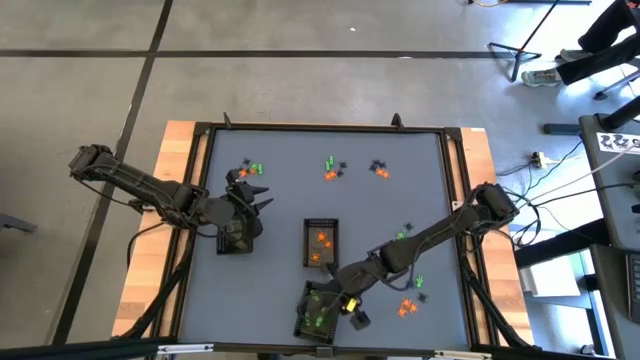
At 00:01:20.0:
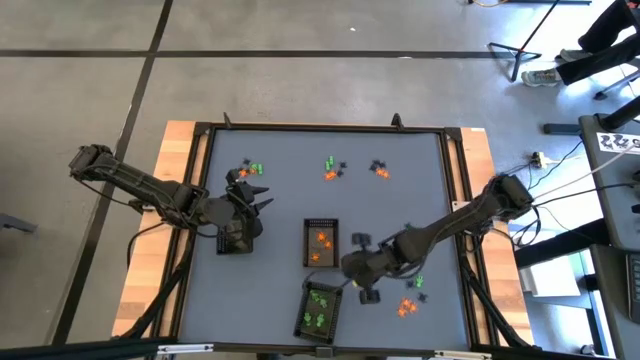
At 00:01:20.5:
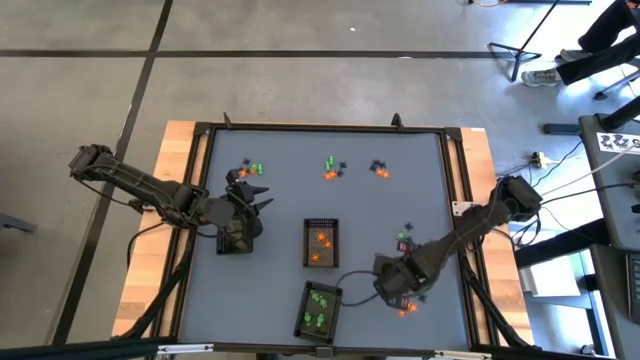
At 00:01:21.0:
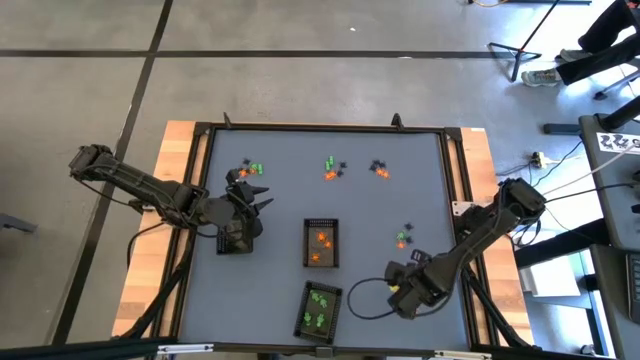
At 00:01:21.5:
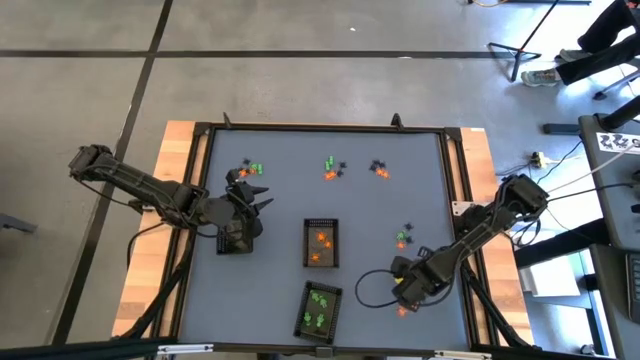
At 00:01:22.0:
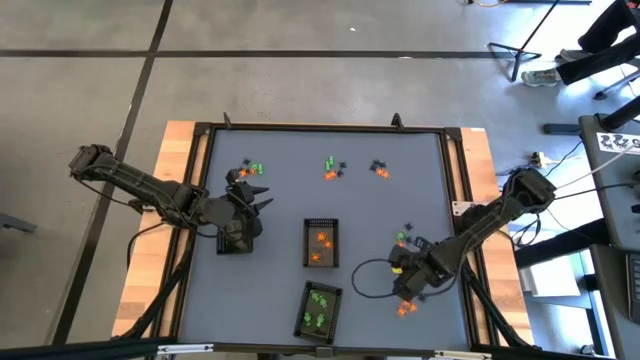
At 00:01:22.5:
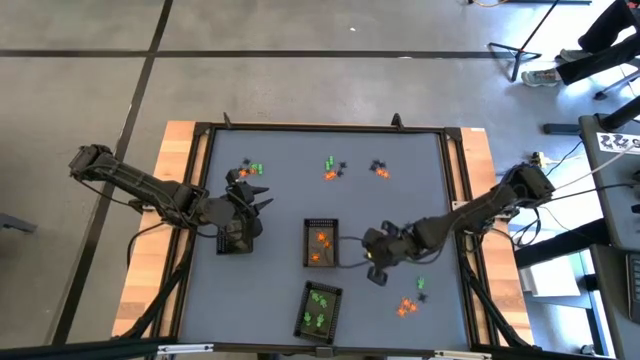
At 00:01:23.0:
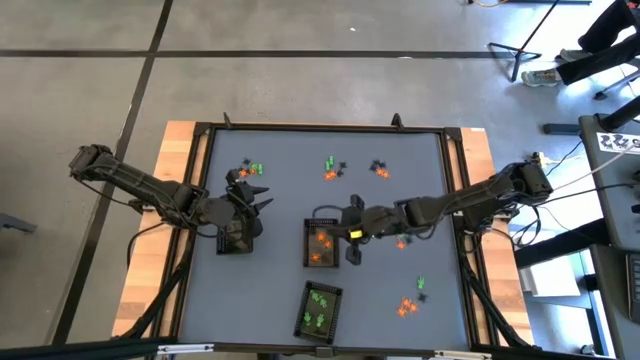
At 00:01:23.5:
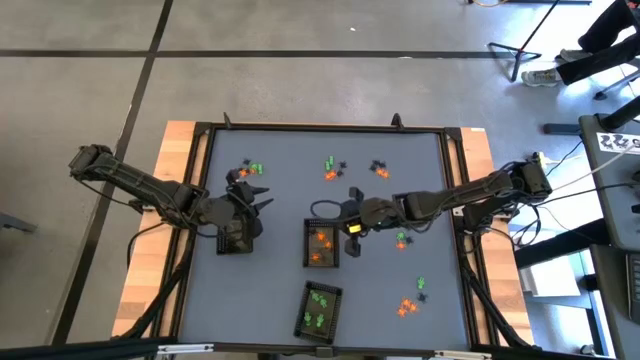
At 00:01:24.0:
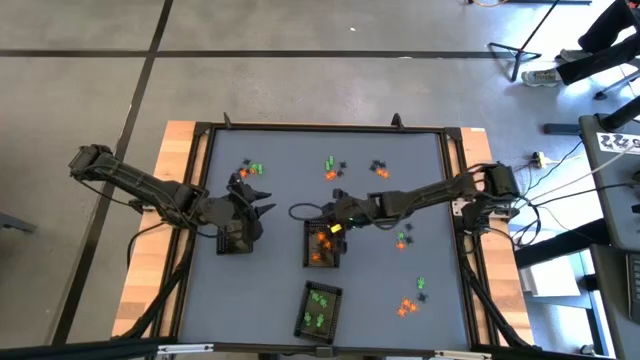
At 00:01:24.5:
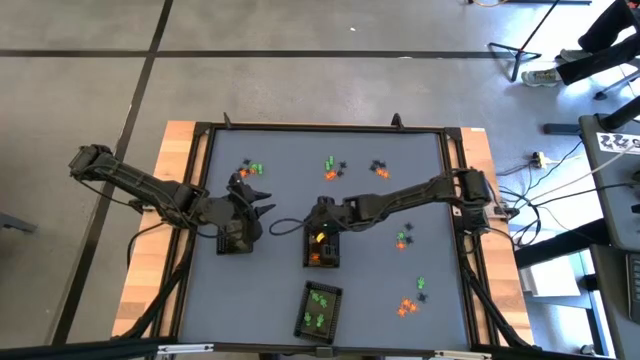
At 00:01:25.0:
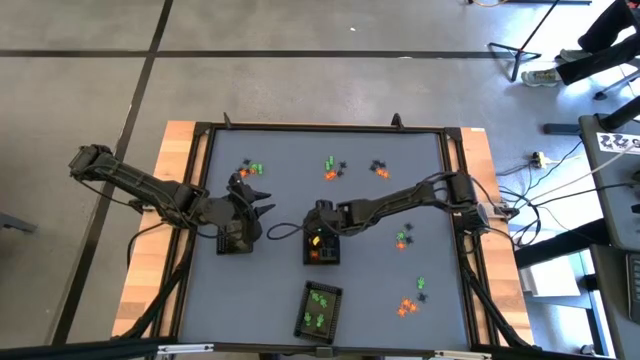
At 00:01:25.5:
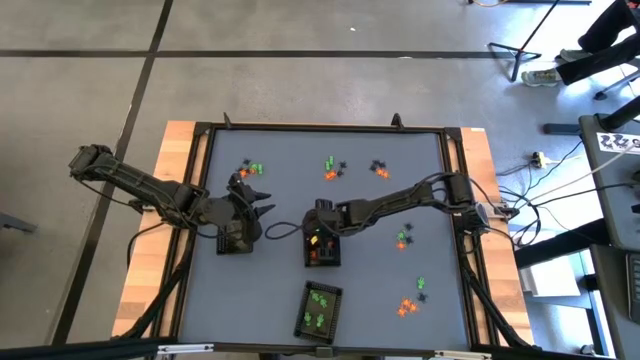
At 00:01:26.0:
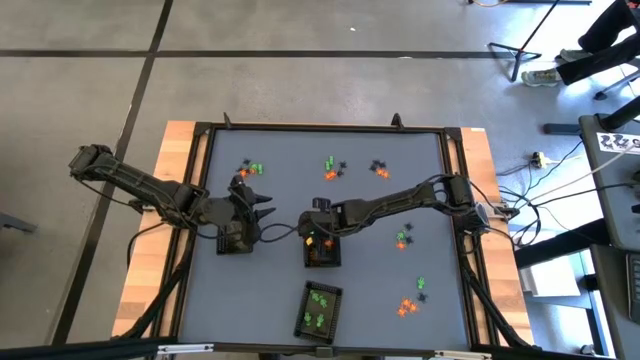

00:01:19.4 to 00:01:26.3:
Task: Sort Halloween decoration
Put the black spider toy into the top left black basket

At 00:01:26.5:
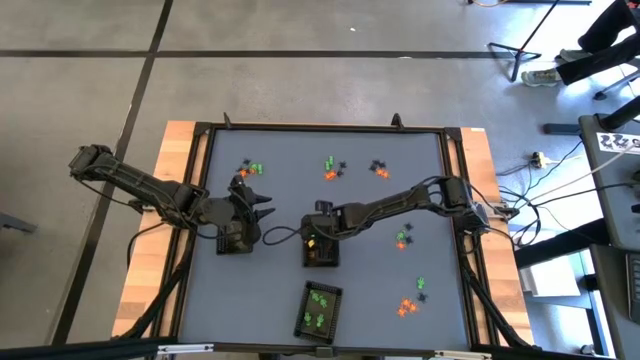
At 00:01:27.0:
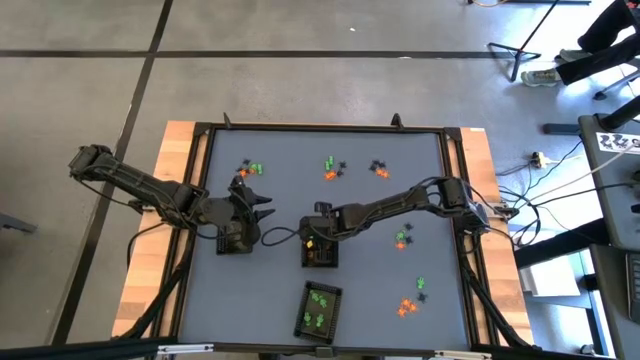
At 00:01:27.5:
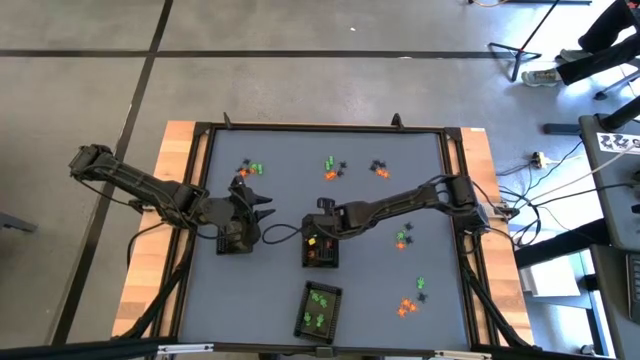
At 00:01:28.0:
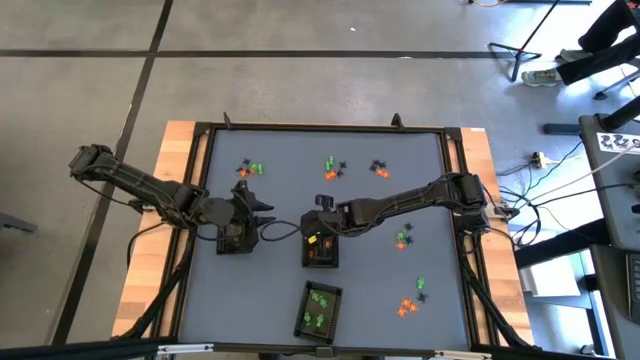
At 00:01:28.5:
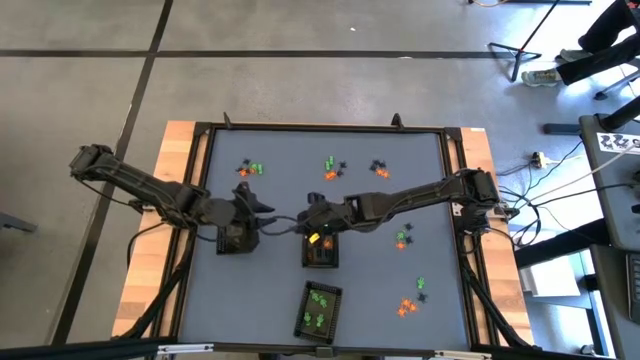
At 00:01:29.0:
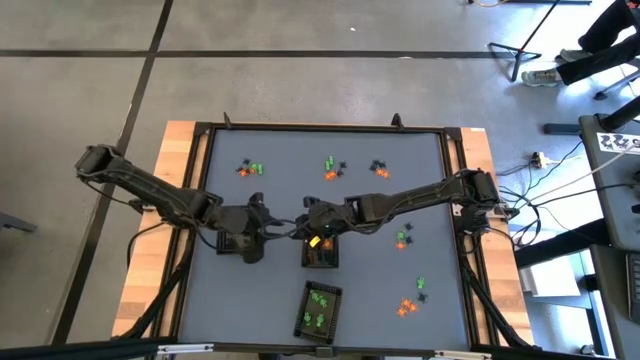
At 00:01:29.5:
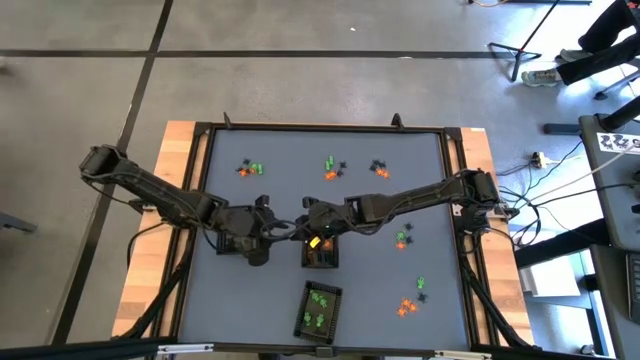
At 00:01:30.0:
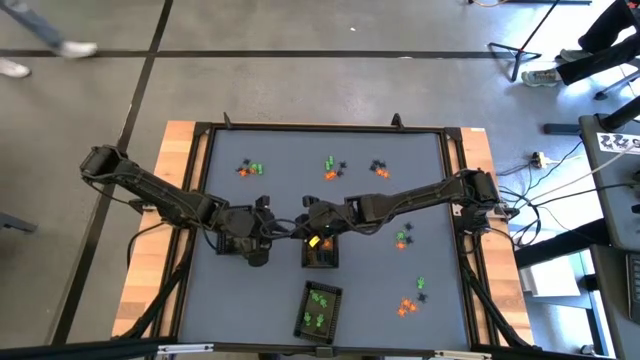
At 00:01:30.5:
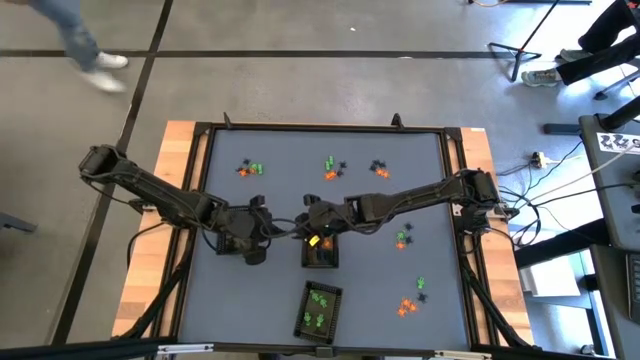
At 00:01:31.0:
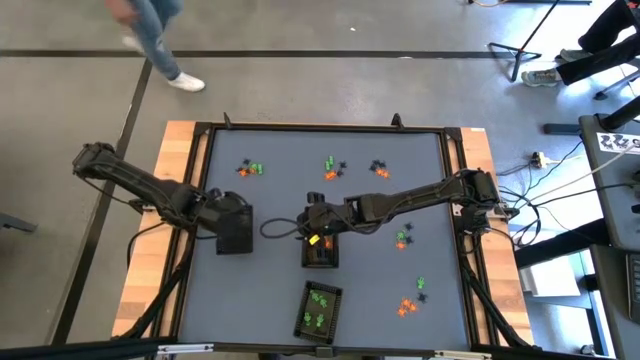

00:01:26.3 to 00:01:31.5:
Put the black spider toy into the top left black basket

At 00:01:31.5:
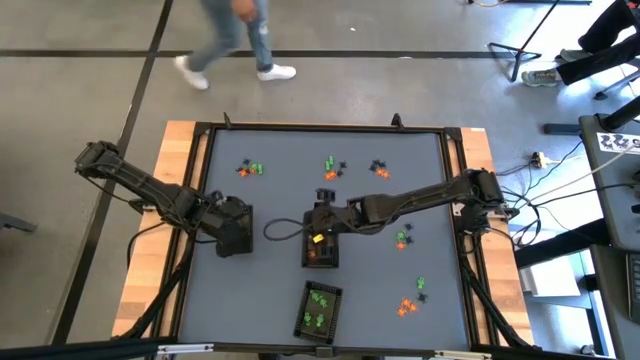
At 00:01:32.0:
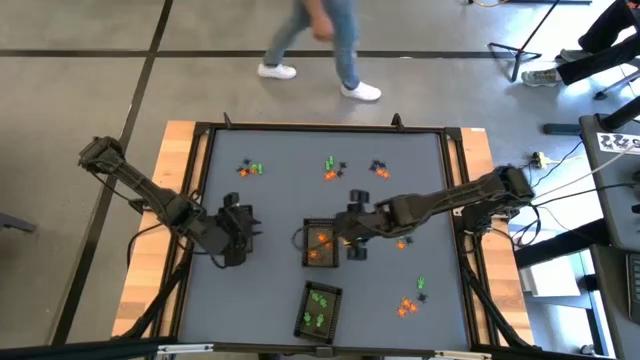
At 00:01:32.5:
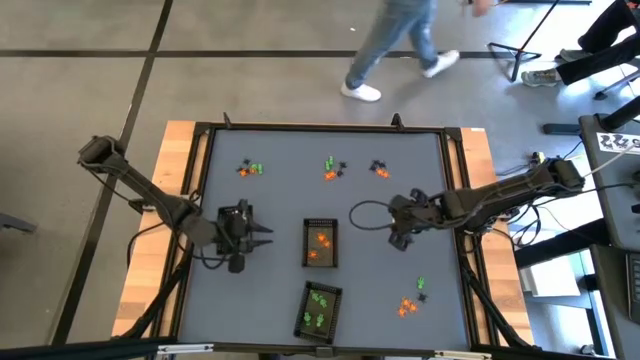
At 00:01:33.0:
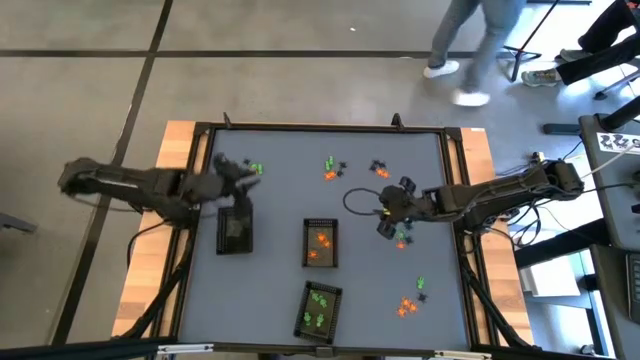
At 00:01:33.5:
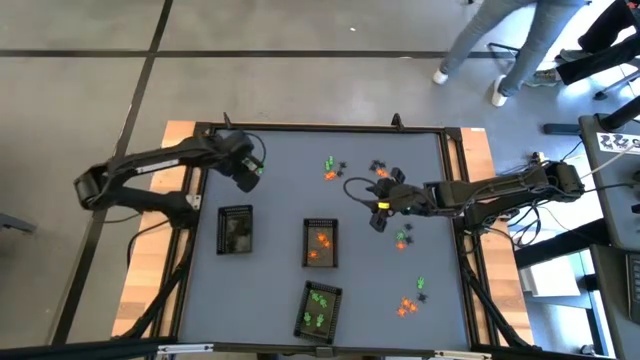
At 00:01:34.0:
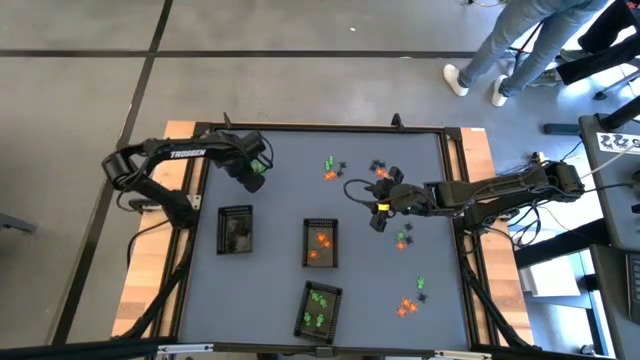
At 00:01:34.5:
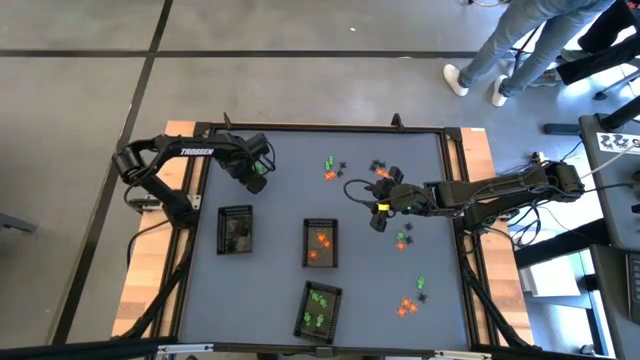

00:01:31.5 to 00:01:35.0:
Put the orange spider toy into the top right black basket

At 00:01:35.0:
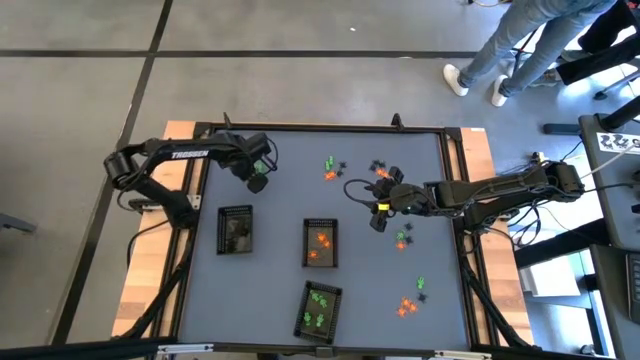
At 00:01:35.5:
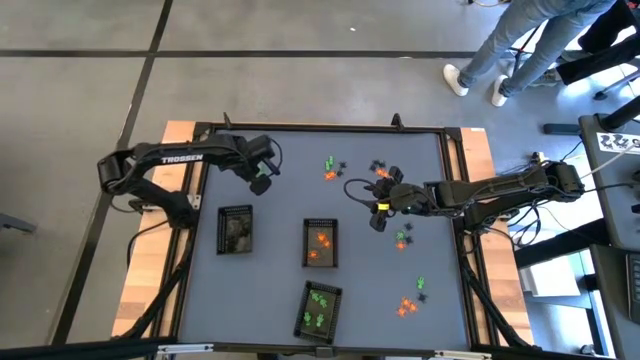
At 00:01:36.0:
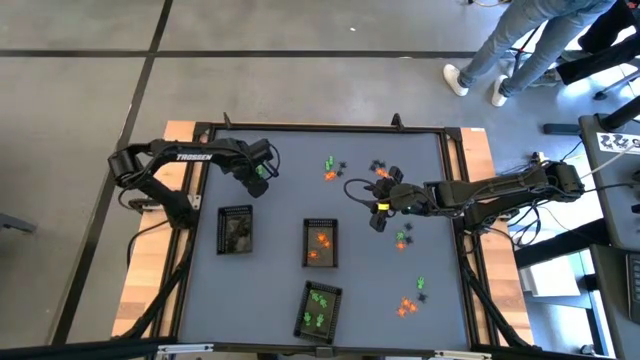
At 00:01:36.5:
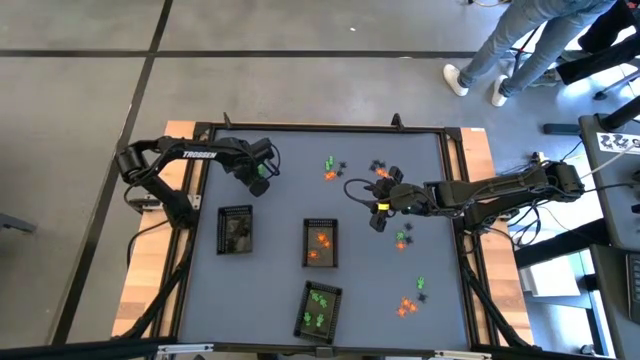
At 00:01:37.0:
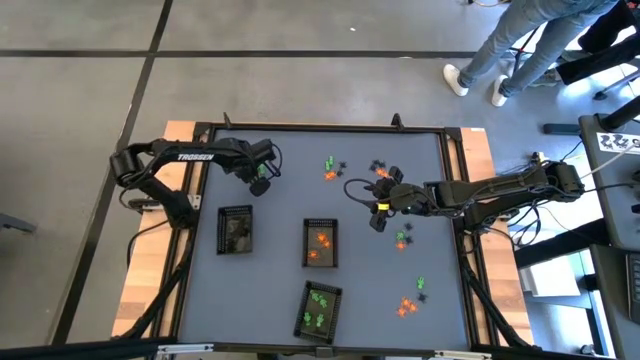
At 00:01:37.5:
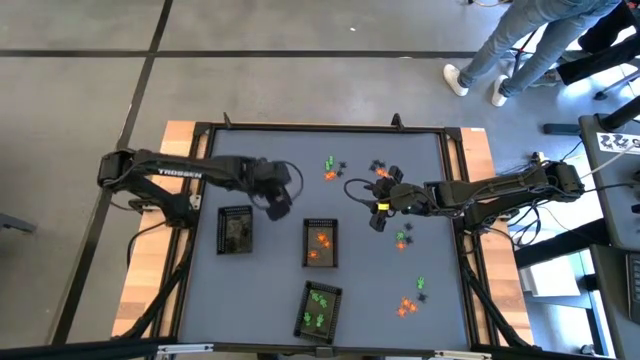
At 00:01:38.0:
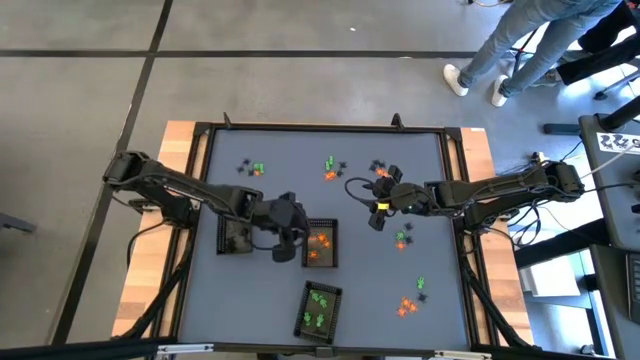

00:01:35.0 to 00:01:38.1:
Put the orange spider toy into the top right black basket

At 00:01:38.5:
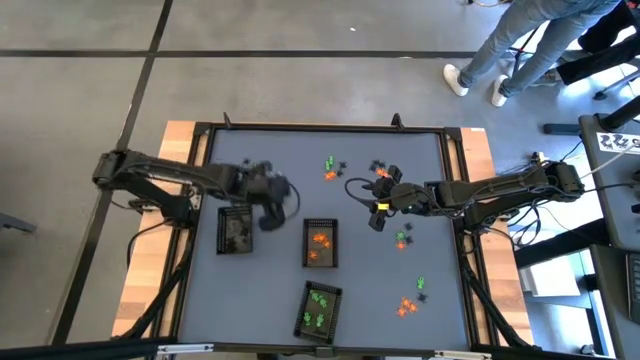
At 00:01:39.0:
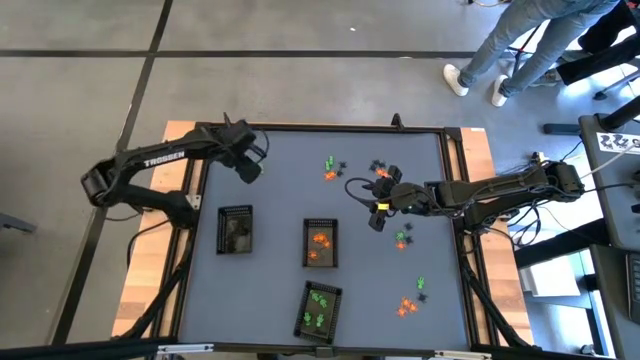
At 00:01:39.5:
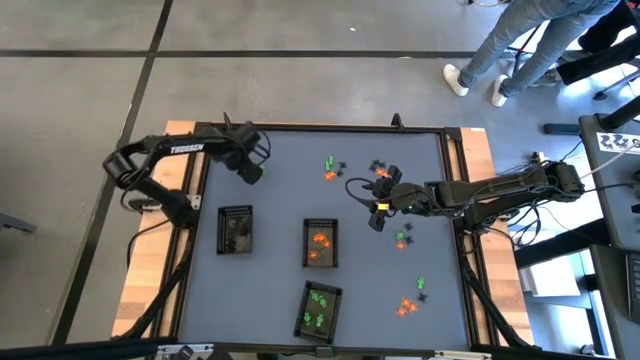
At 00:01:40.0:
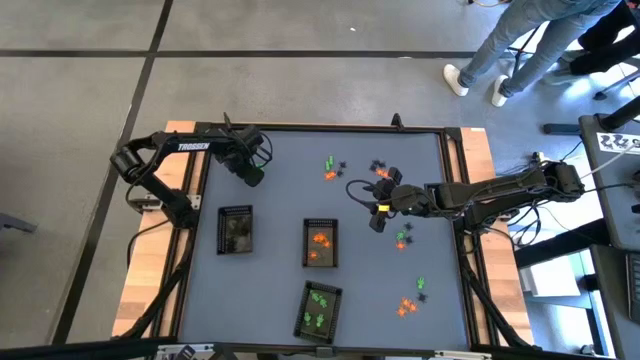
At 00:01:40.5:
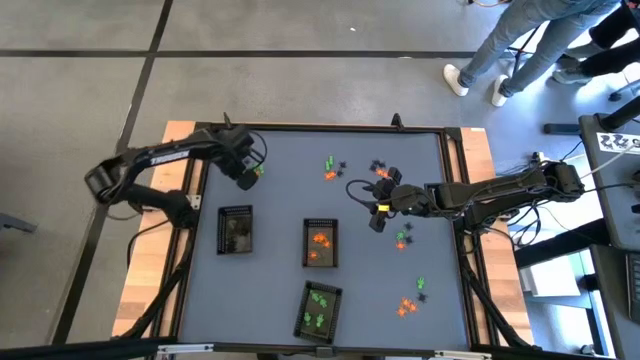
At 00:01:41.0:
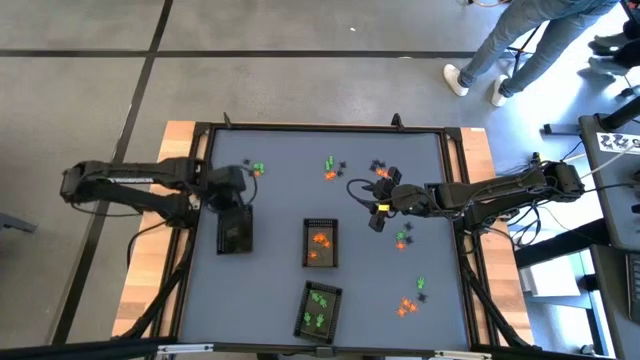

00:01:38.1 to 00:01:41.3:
Put the black spider toy into the top left black basket

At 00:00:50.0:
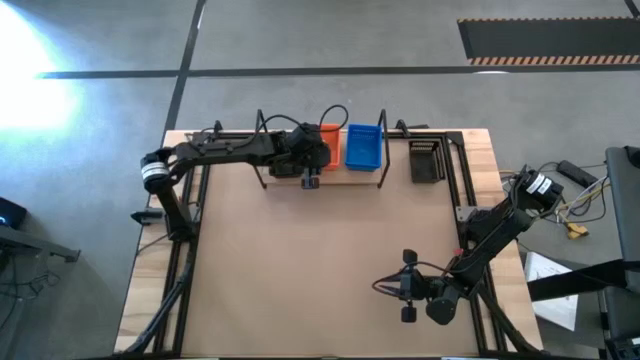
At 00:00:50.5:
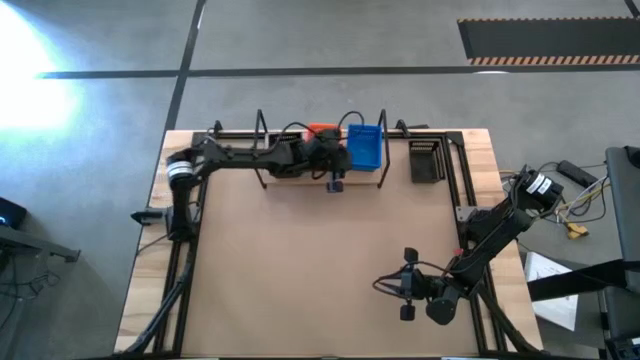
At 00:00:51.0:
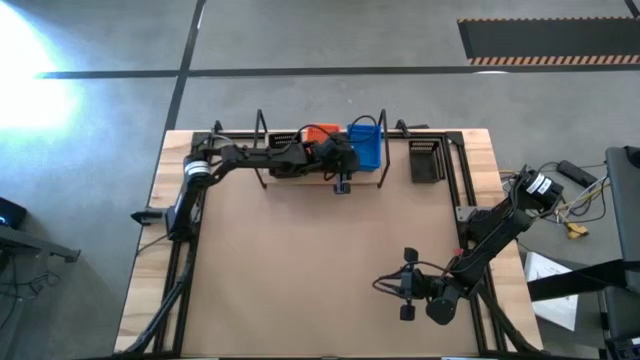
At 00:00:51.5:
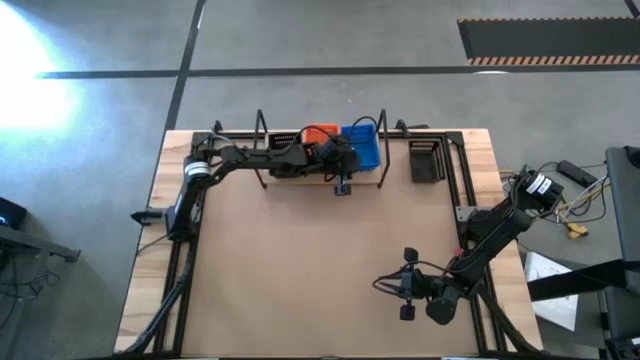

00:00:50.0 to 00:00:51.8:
Task: Stack baskets on shelf by color
Adjust the stacked blue bin on the shelf
